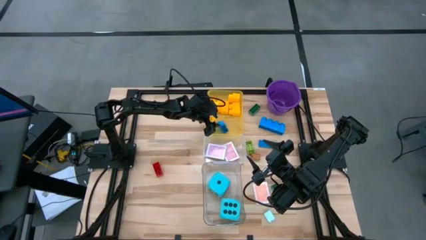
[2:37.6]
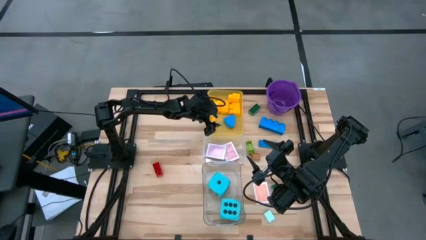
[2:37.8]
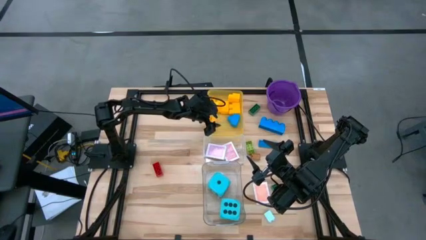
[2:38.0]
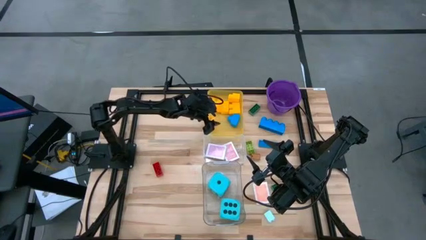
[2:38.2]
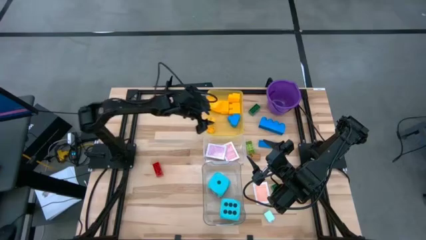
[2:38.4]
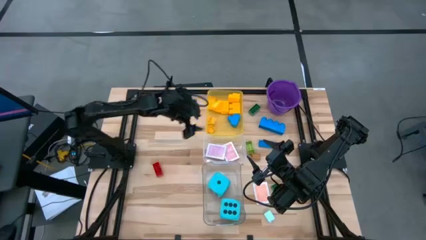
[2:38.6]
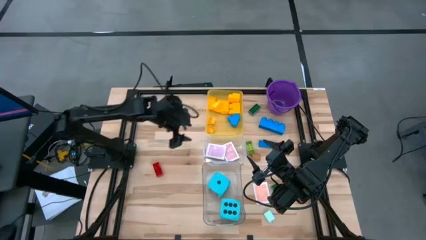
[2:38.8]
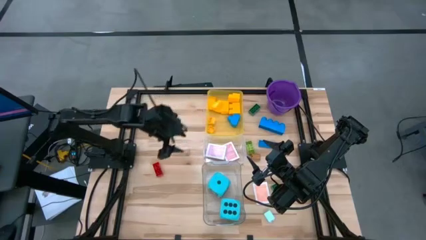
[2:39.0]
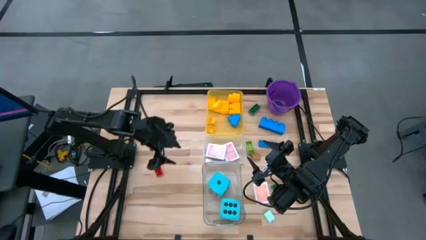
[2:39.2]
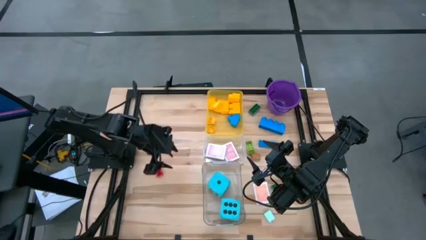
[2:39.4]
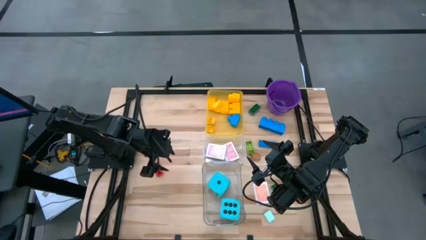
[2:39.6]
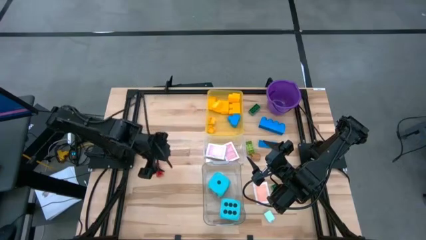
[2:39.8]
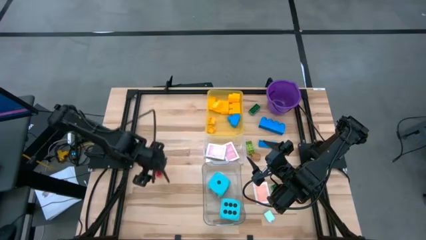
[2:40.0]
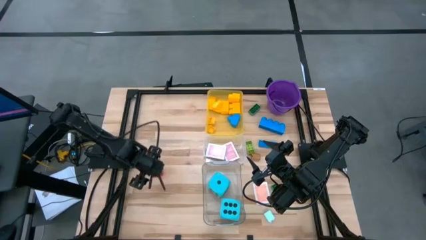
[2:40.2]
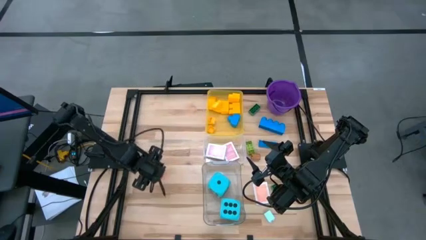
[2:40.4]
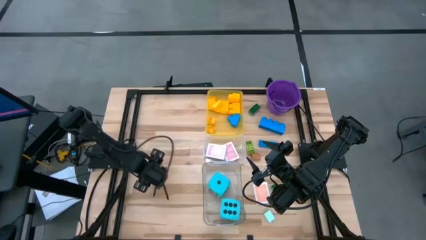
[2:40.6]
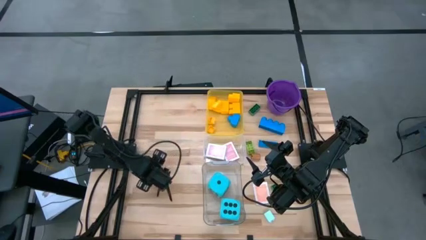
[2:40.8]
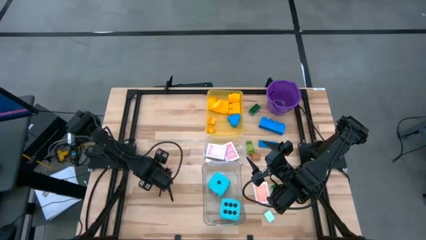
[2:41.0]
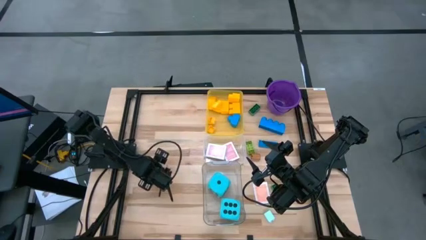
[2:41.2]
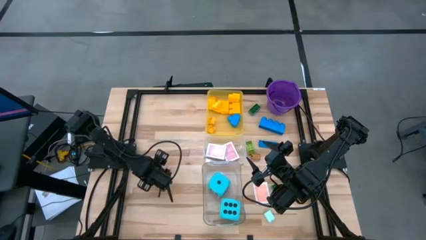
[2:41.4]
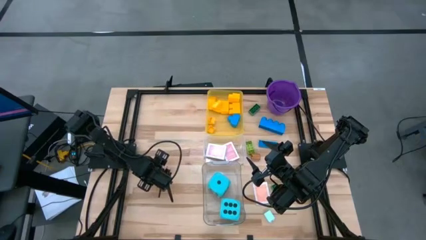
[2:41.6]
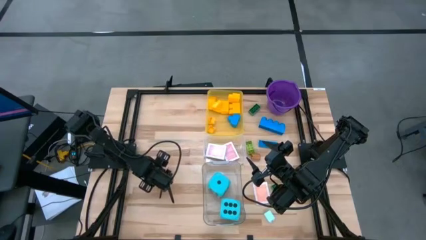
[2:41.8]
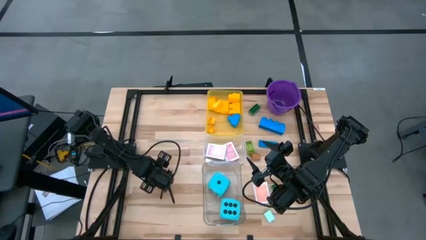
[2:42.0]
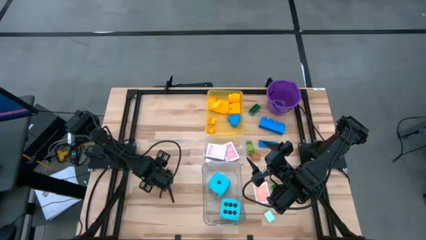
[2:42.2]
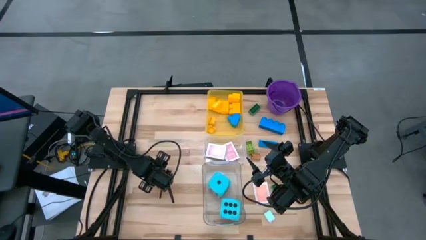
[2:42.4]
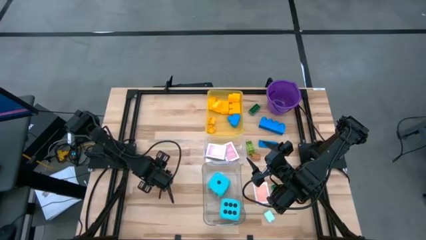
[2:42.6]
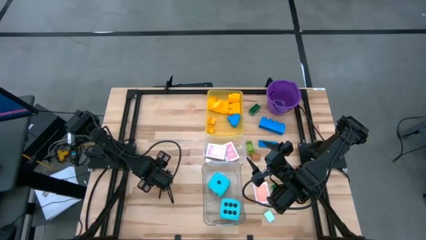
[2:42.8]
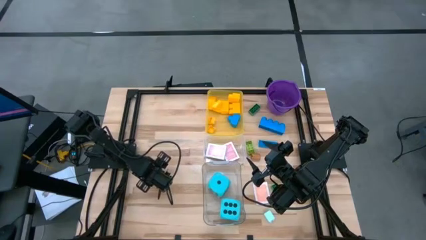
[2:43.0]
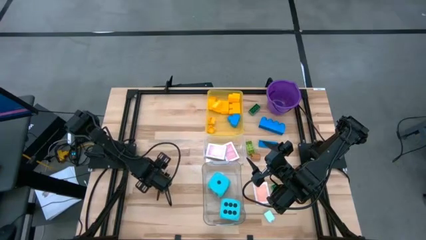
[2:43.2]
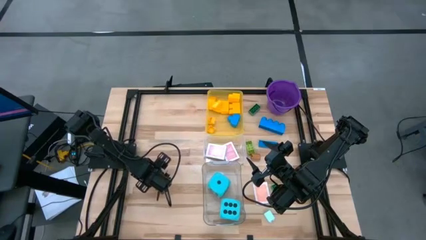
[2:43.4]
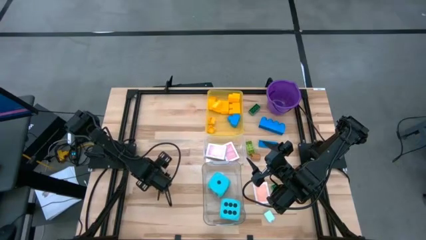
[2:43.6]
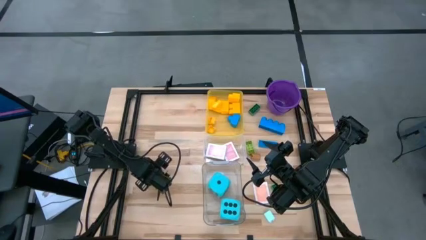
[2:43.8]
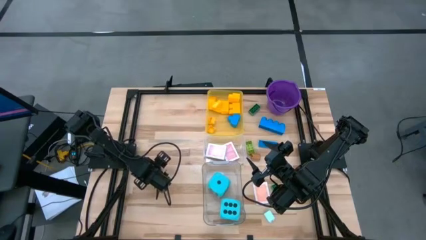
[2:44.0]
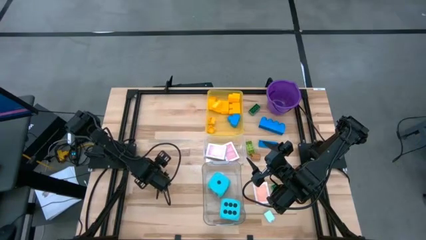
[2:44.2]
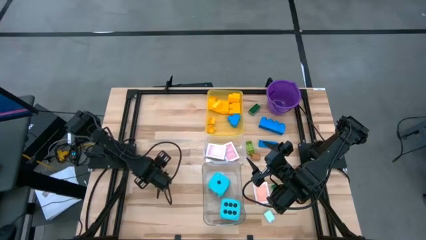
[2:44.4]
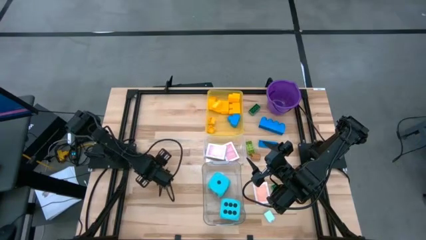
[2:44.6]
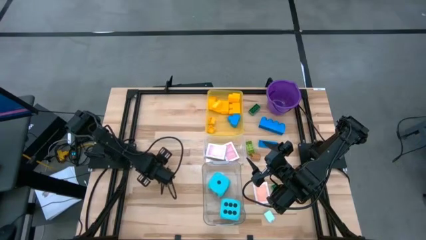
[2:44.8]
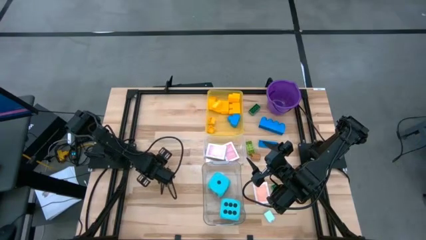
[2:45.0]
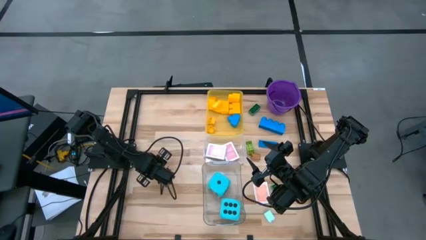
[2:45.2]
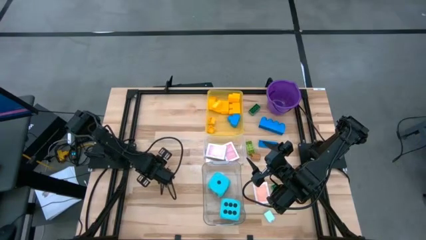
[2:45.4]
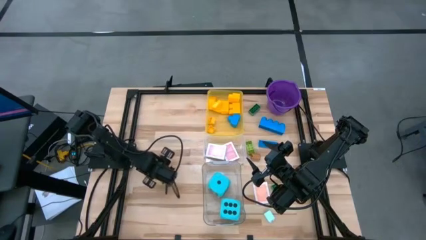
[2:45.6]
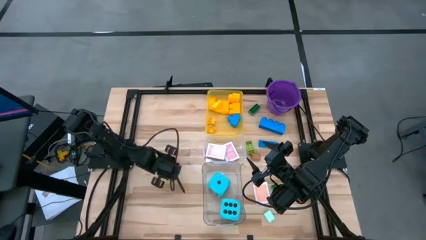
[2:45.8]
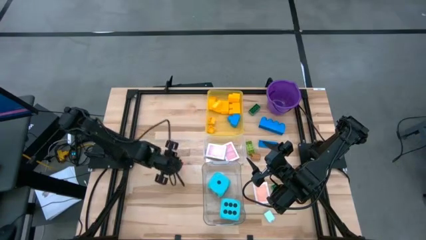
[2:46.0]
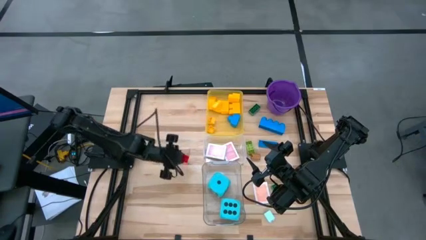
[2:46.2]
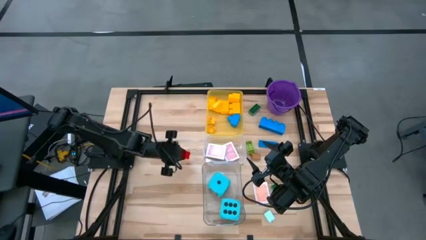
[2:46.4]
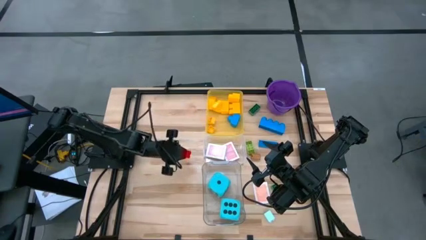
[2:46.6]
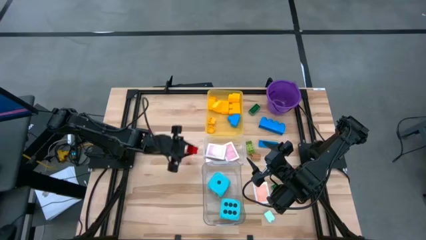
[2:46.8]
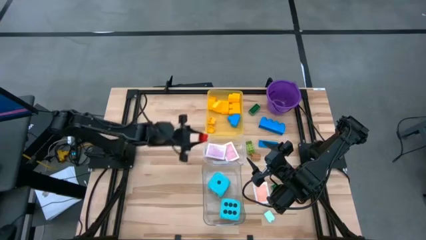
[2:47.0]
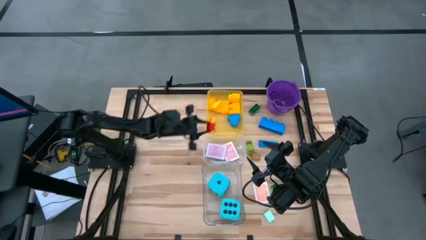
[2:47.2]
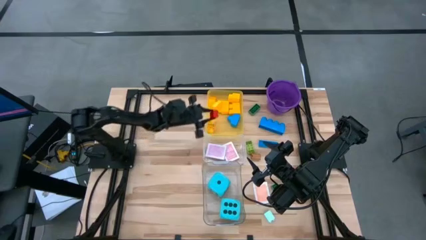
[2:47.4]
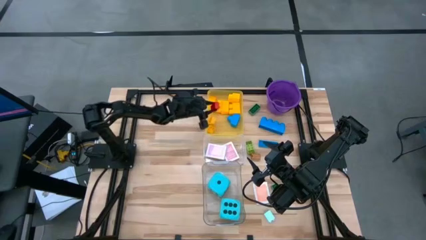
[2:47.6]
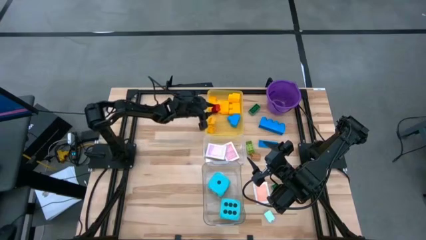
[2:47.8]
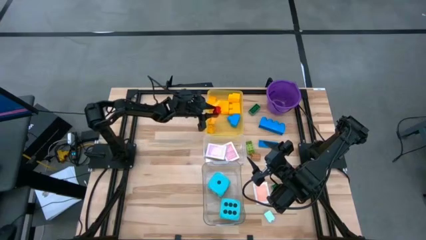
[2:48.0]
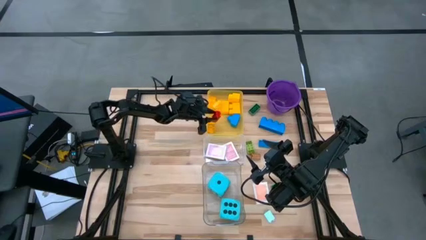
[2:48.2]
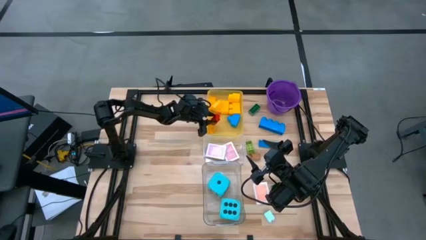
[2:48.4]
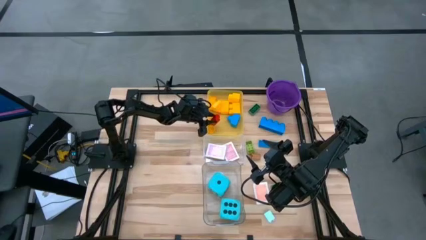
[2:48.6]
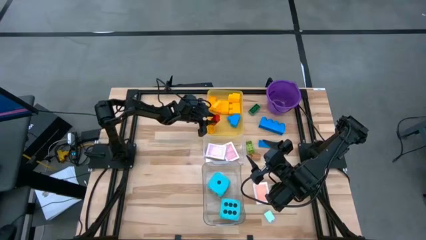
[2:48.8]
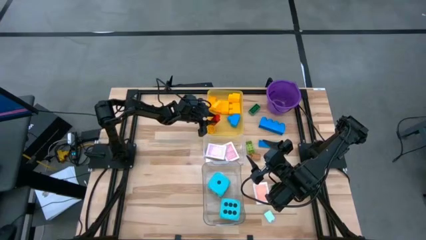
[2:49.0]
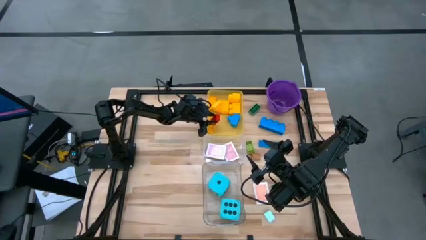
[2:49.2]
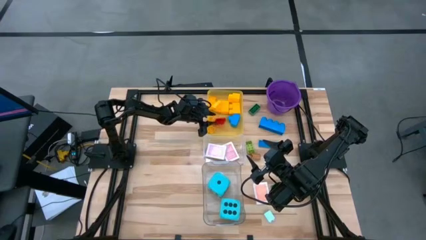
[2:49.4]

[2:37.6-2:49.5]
Task: Pick & Place Toys
Put the red game piece into the yellow bin

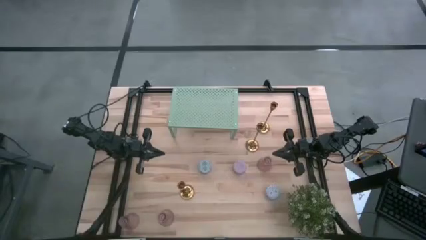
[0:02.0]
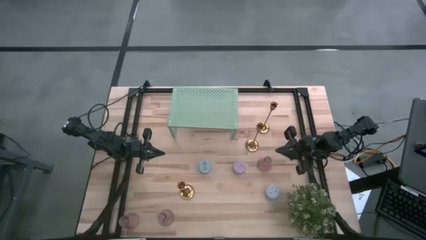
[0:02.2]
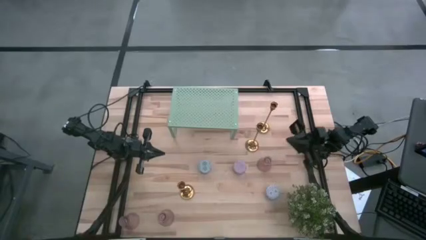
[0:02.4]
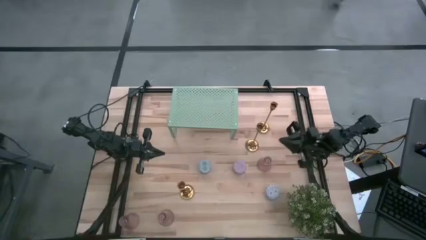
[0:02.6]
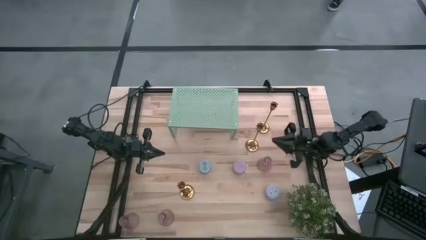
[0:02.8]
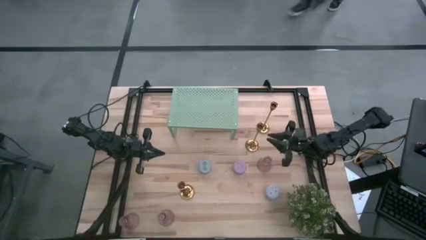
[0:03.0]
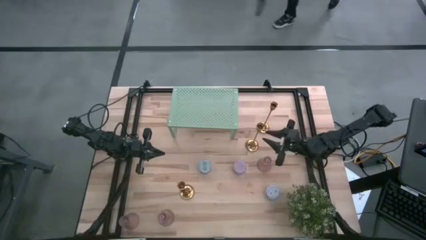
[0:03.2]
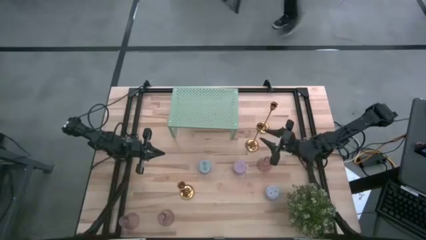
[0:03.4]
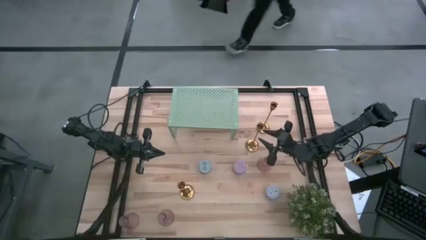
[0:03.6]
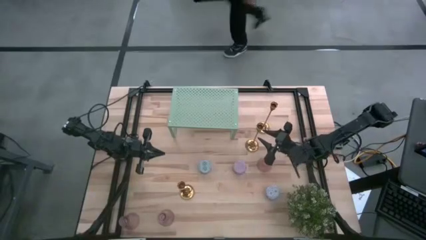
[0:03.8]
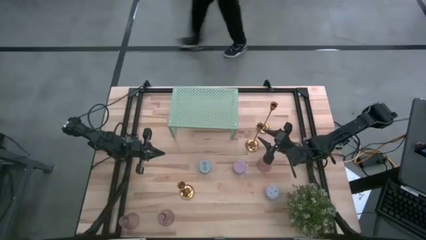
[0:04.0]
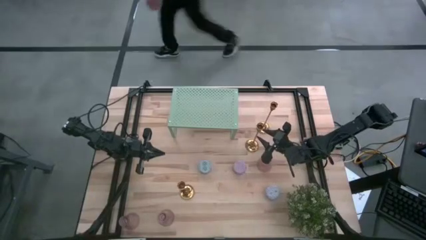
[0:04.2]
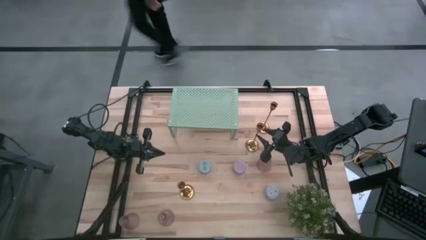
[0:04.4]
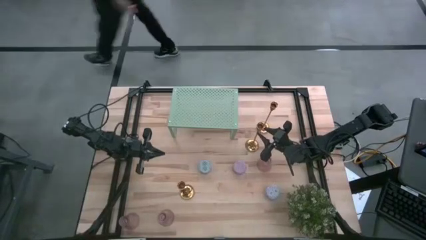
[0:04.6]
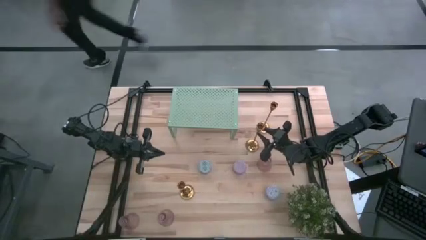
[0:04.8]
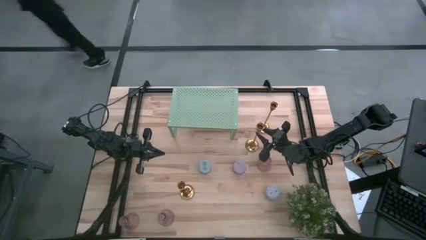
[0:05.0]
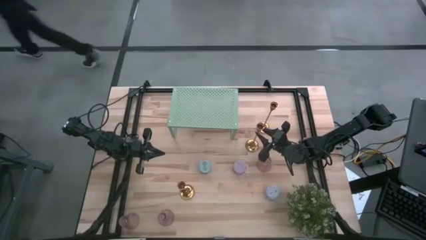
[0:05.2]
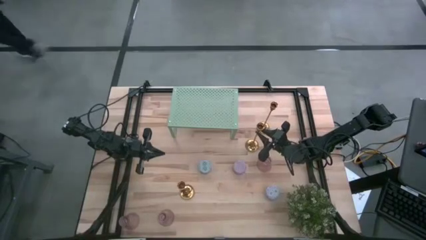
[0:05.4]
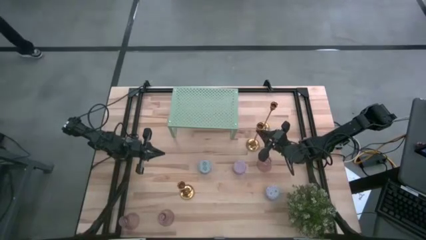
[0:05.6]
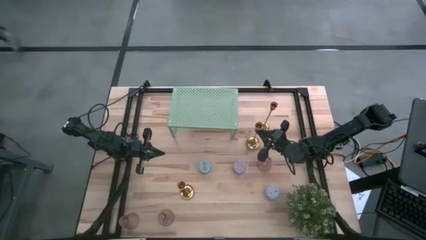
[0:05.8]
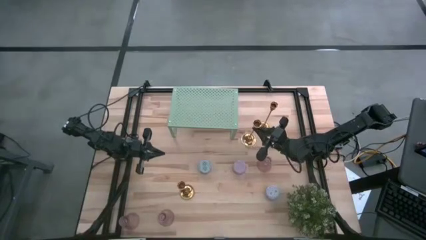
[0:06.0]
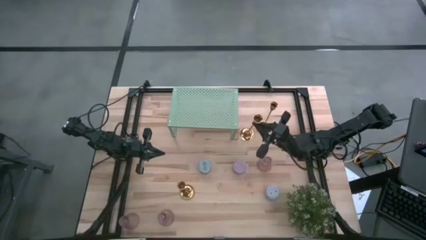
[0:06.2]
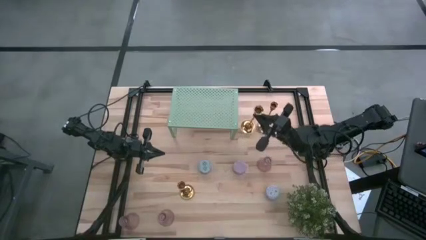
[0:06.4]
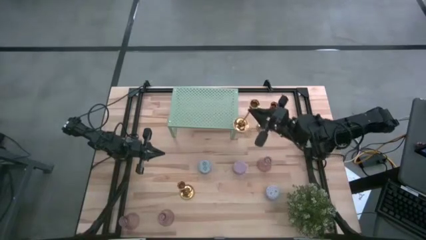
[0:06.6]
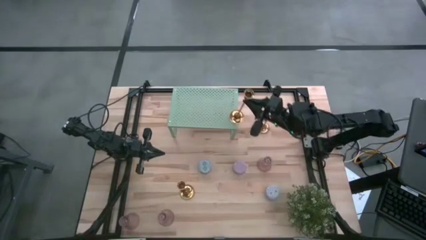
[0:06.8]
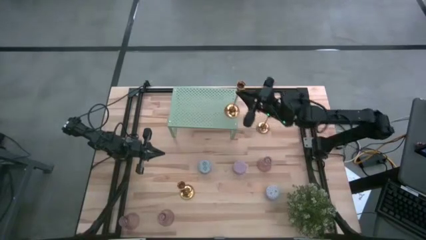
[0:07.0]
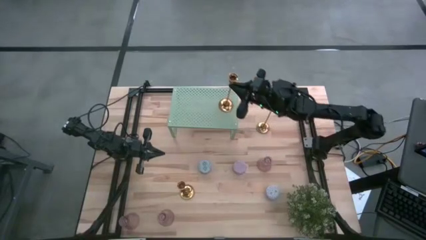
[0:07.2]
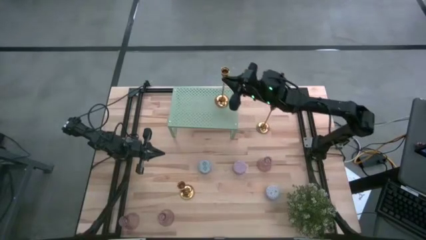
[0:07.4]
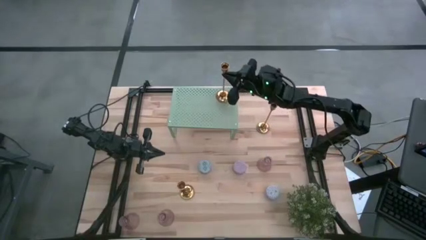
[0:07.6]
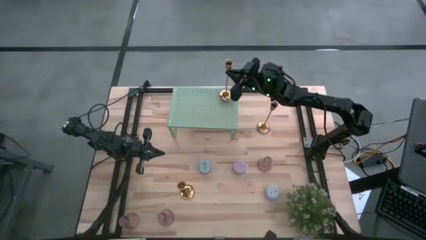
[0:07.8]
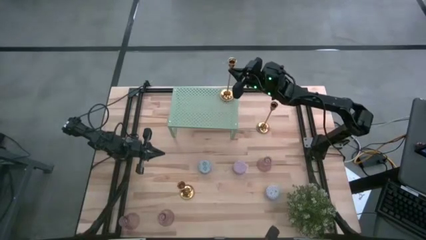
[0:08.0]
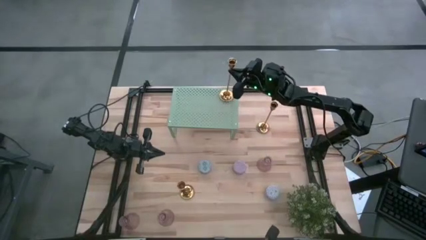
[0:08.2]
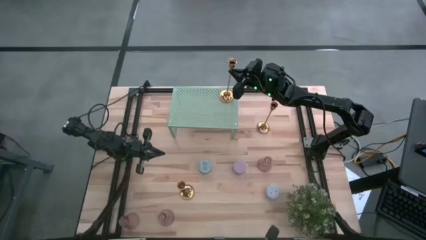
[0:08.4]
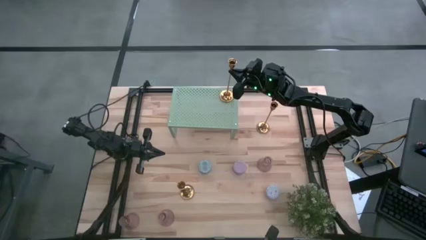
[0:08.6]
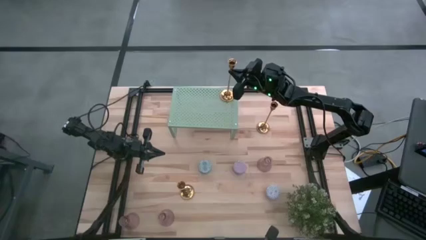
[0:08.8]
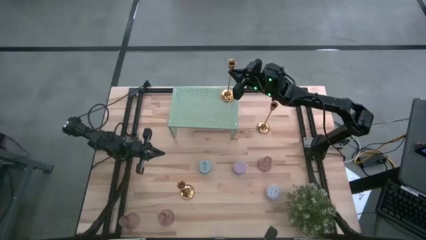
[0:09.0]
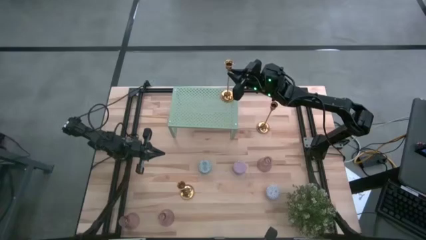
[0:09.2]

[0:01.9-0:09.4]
Task: Pick & Place candle stick holders
Put the middle gold candle holder on the shelf
